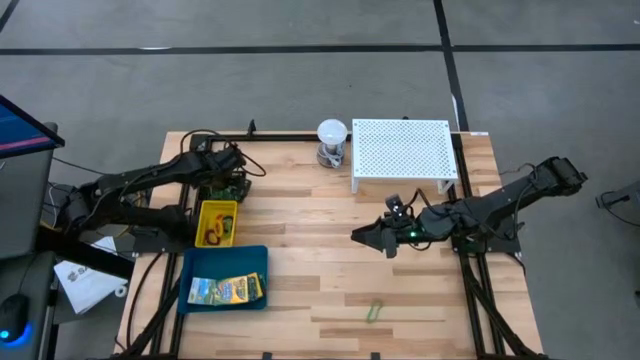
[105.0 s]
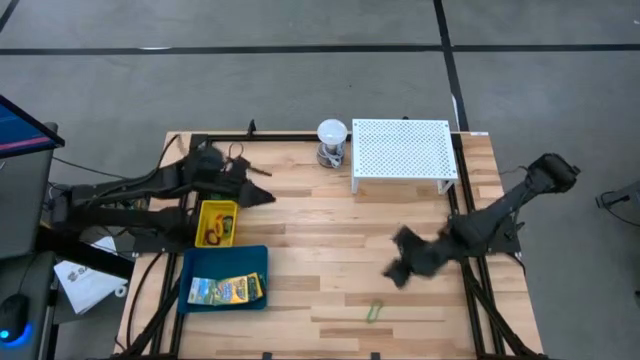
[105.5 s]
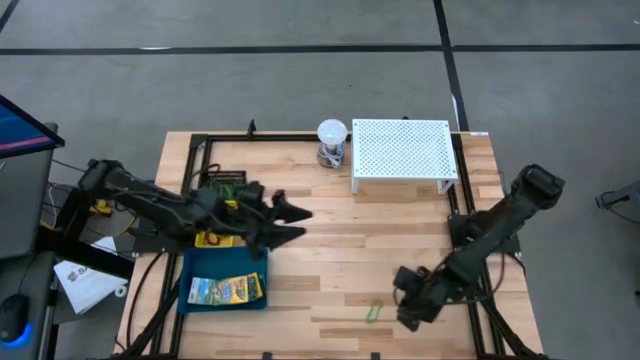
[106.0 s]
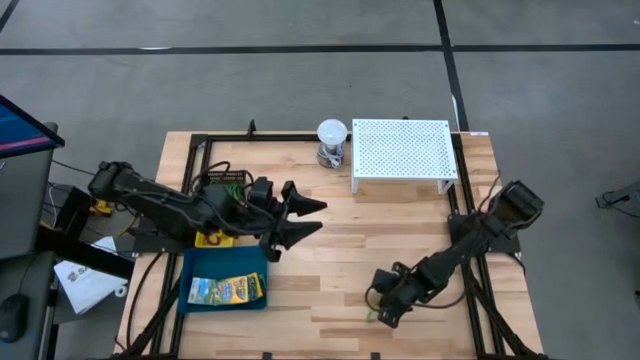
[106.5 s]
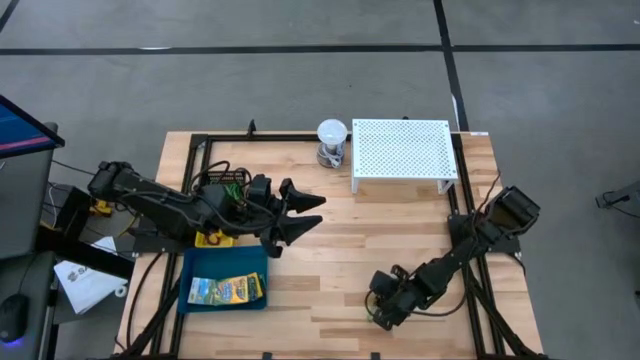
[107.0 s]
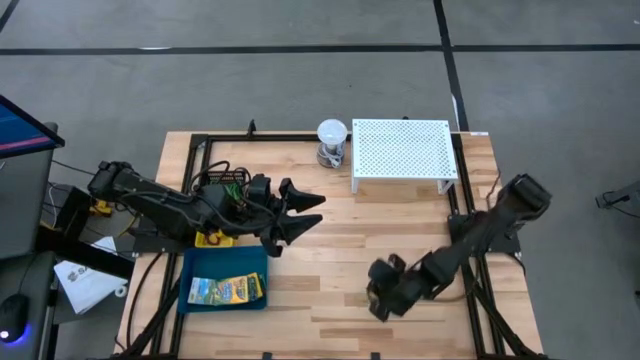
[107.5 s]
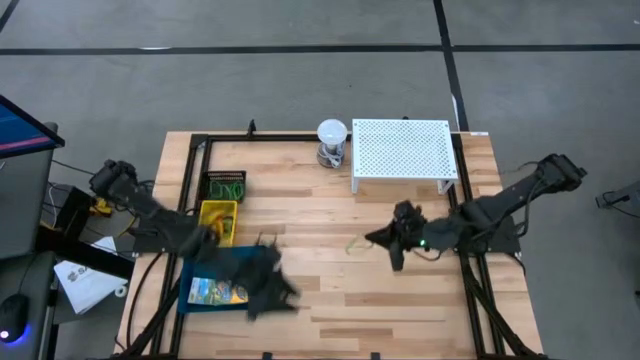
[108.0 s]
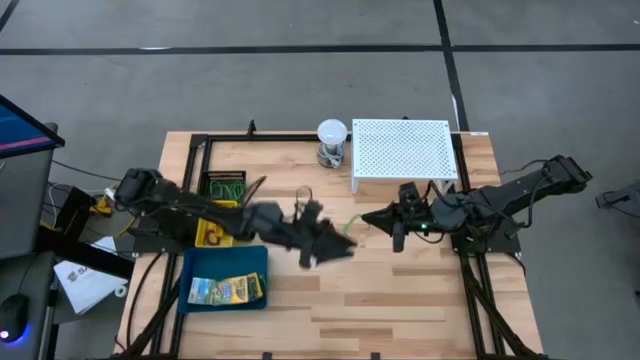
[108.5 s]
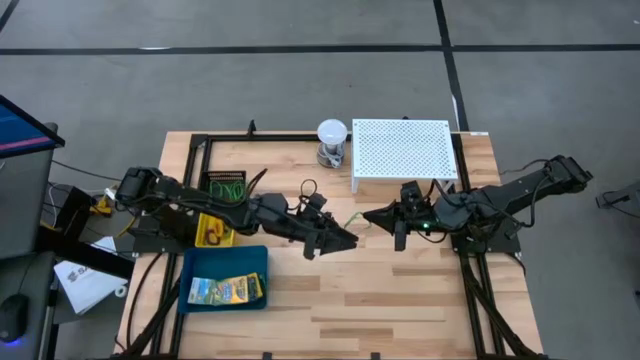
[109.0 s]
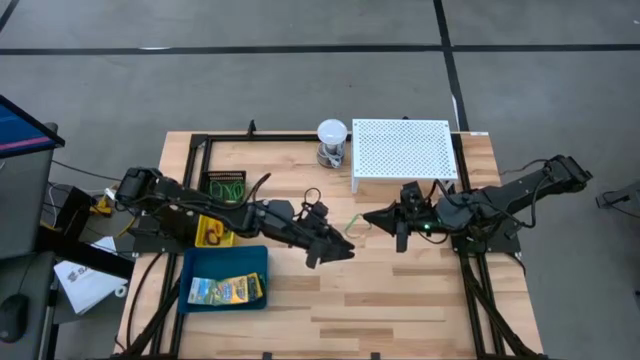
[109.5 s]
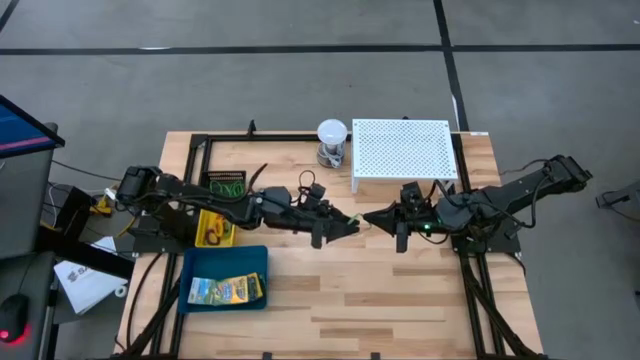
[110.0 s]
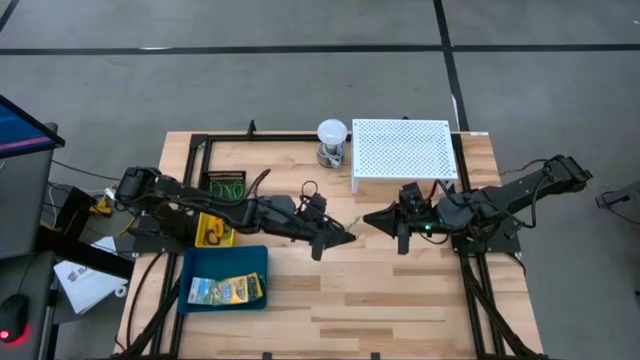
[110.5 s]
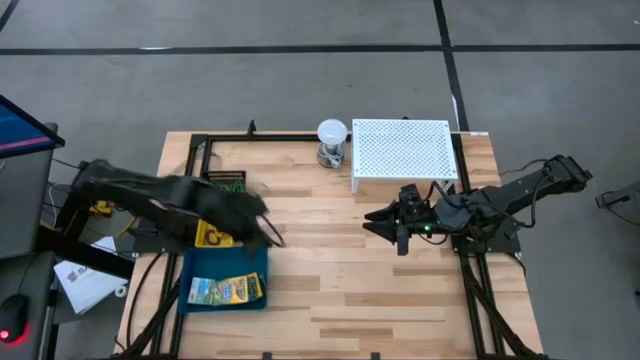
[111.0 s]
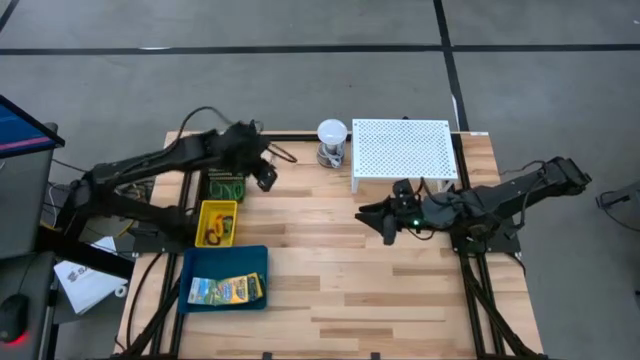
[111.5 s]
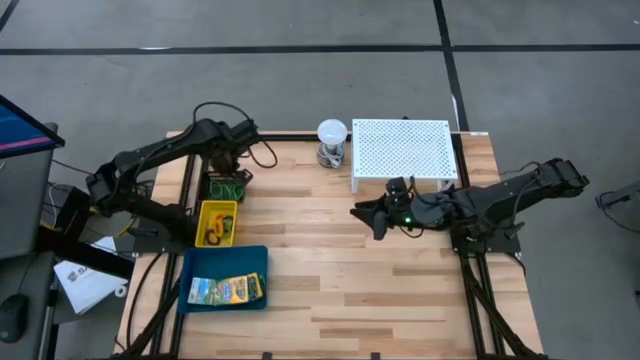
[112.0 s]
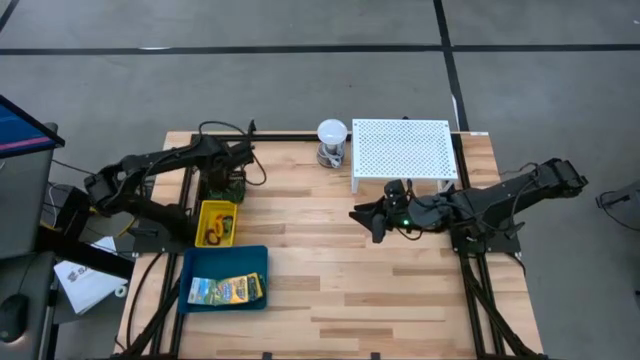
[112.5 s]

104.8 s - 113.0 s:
Task: Pick & Place Office Desk Supplies
Put the rubber band into the black bin

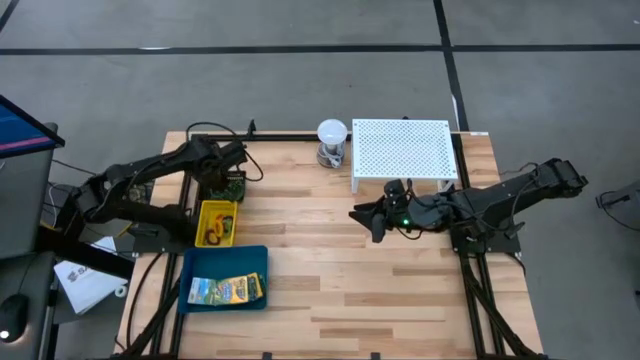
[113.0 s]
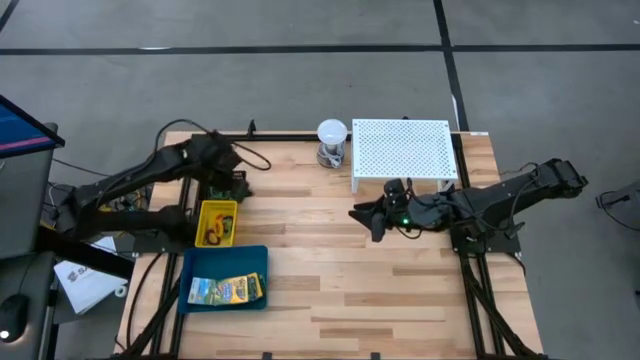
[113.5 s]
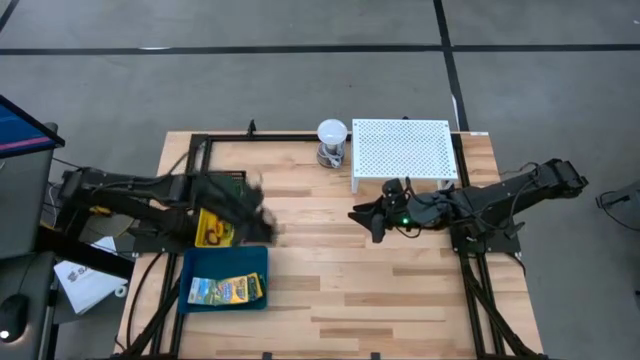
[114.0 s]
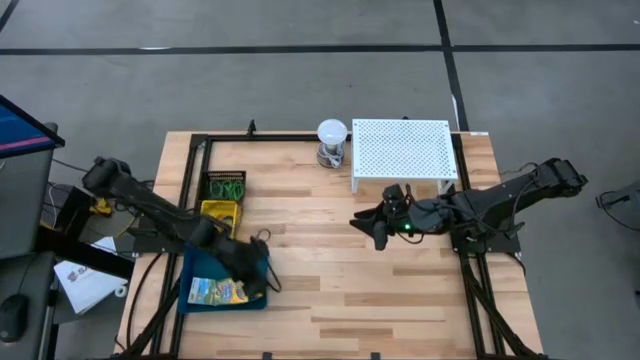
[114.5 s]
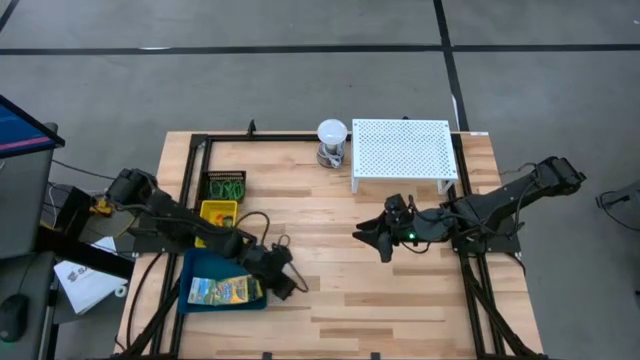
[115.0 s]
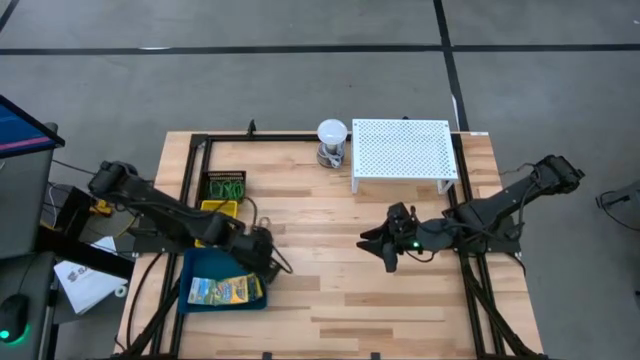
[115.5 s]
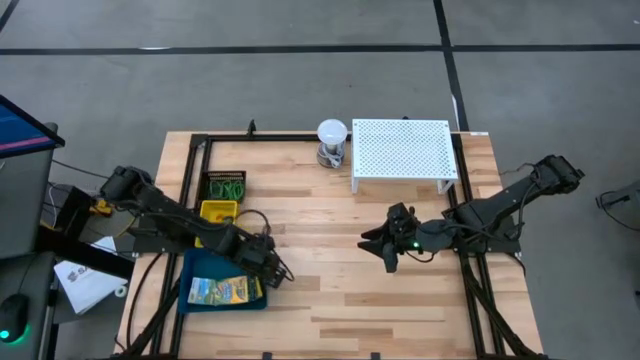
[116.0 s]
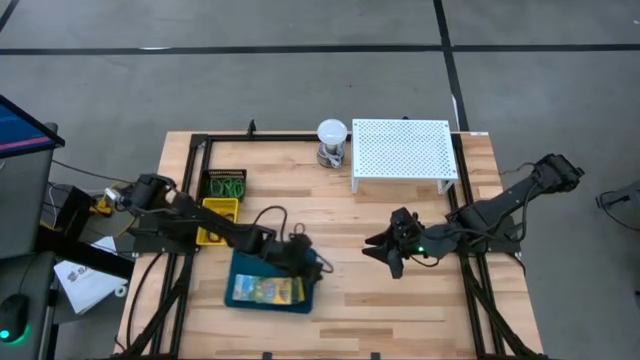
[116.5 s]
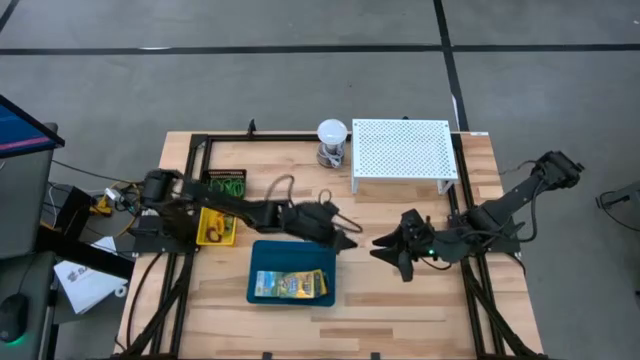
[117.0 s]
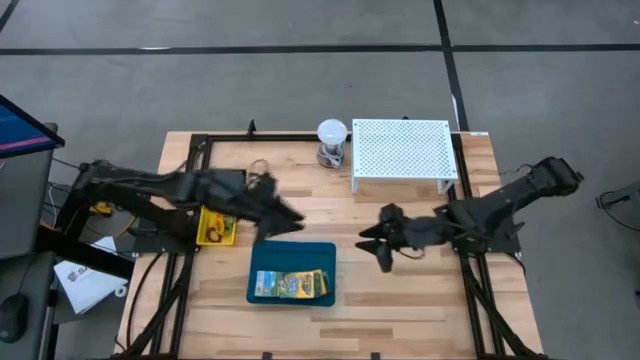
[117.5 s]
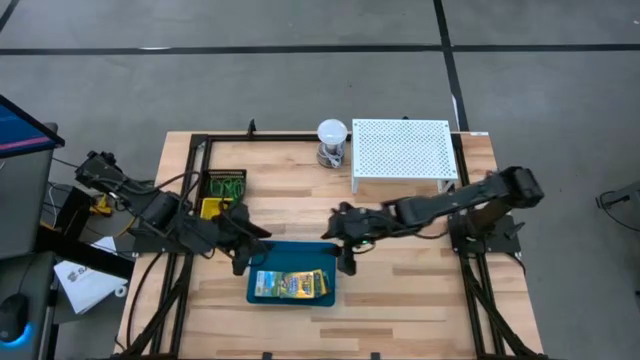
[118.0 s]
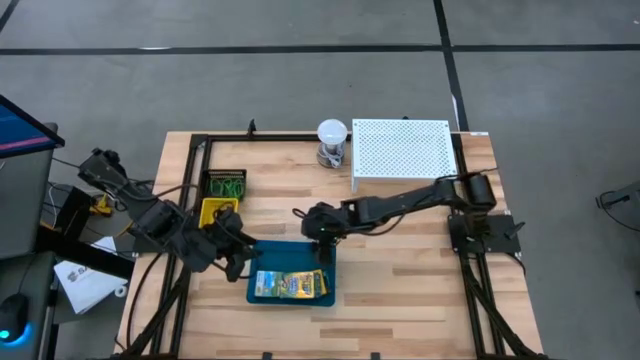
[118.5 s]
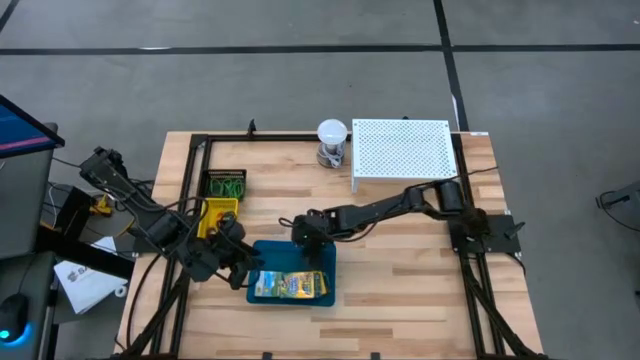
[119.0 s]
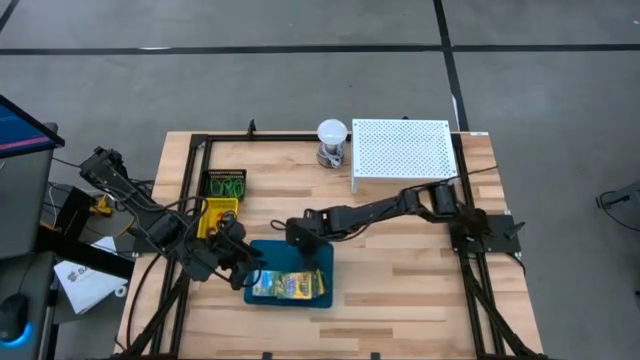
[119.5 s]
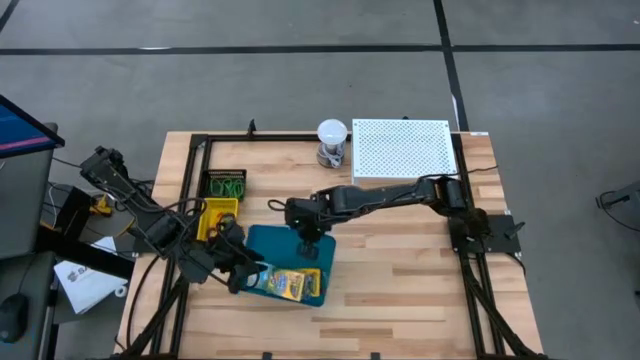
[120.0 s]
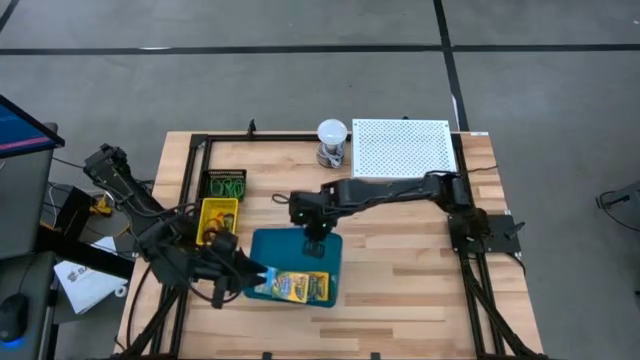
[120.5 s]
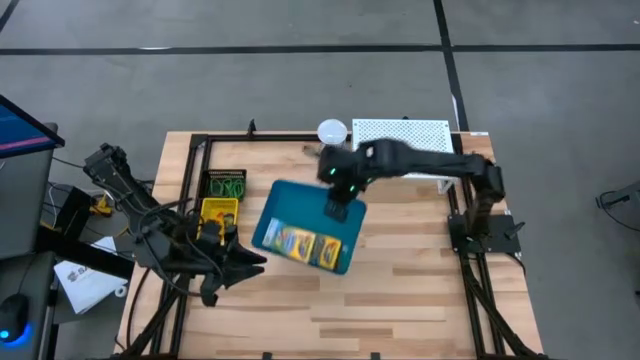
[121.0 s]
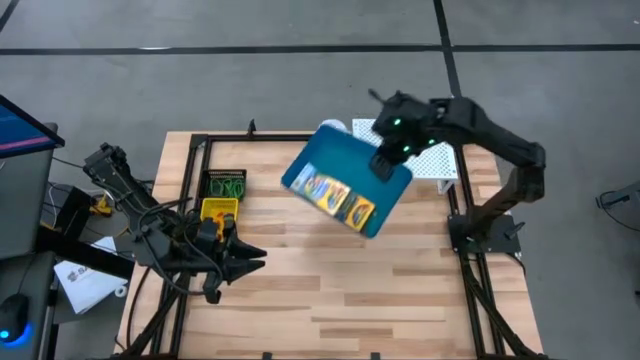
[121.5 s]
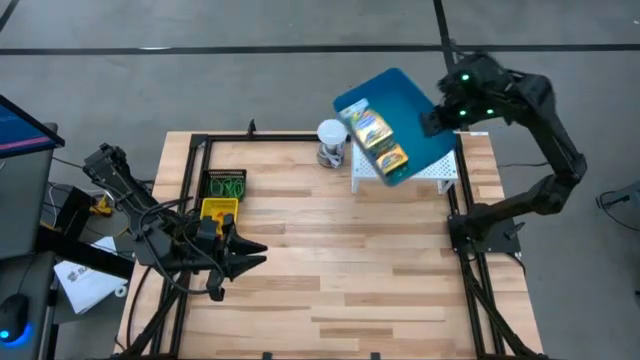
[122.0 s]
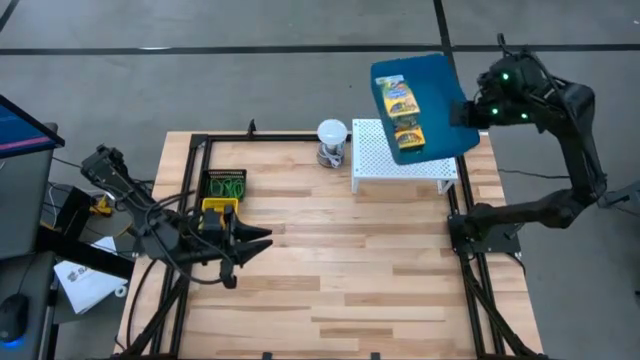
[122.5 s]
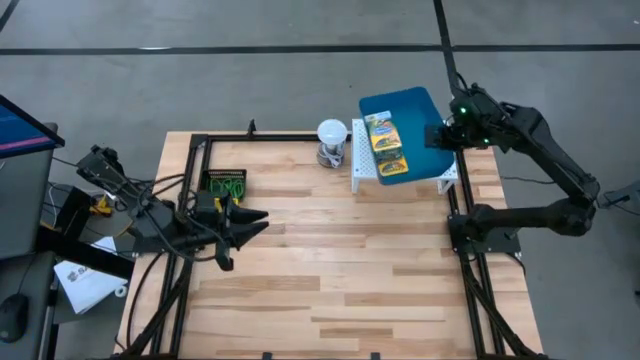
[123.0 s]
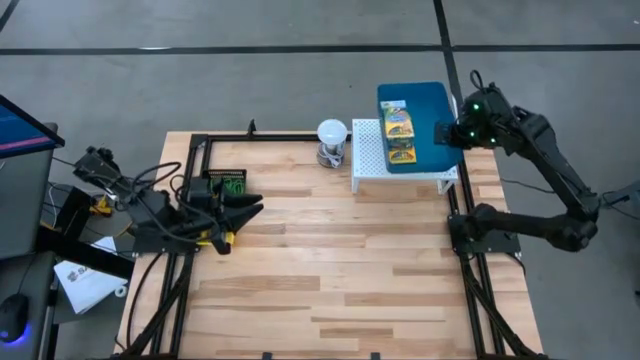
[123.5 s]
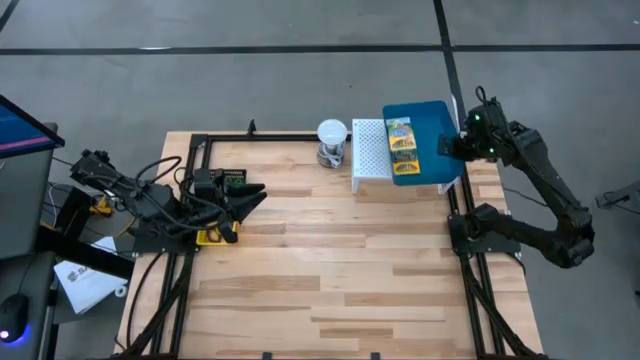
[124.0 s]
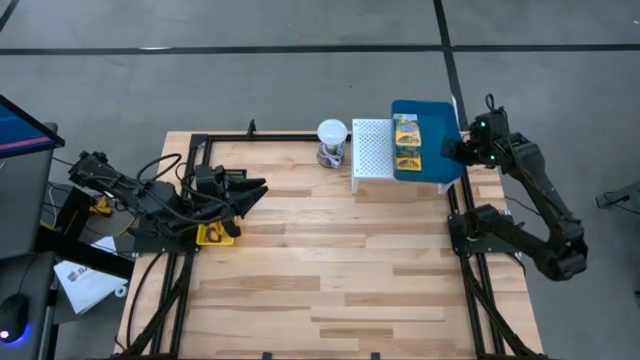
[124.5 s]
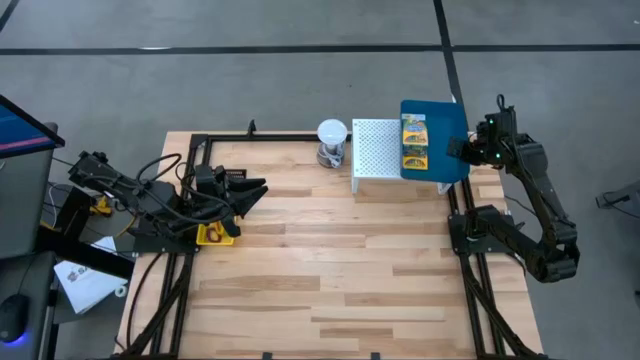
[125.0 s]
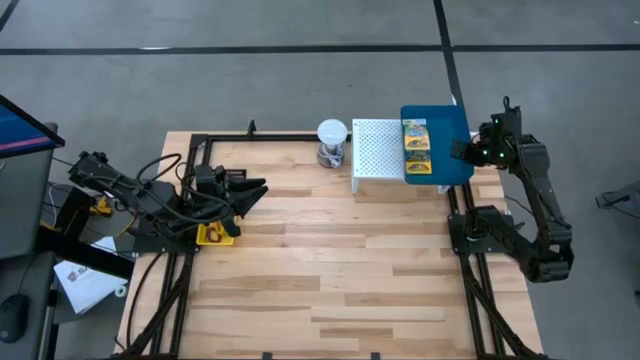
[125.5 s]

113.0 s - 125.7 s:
Put the blue bin on the shelf

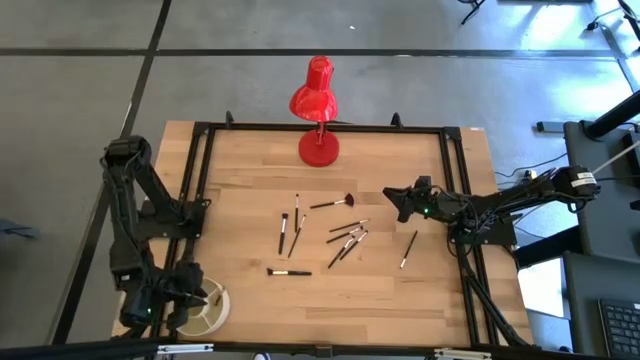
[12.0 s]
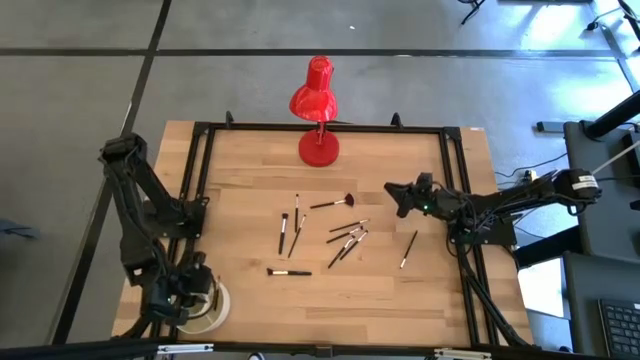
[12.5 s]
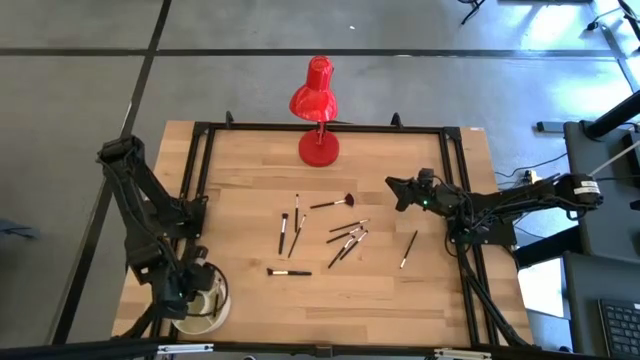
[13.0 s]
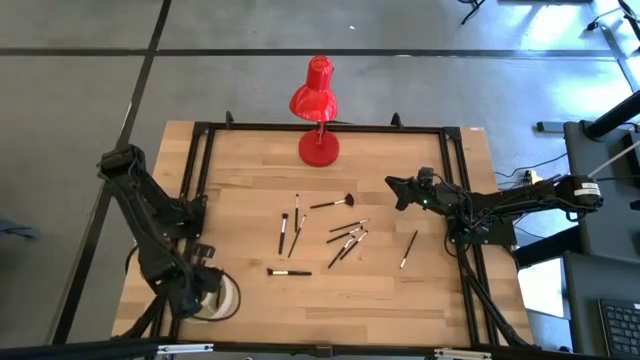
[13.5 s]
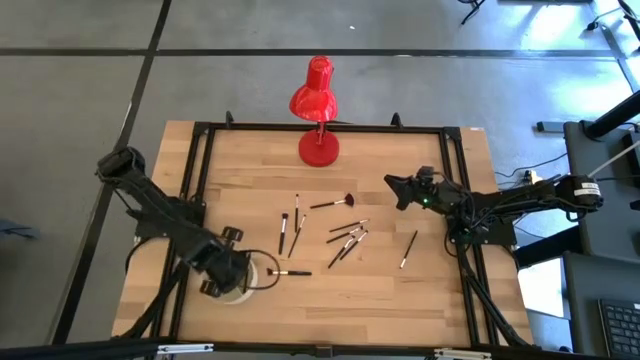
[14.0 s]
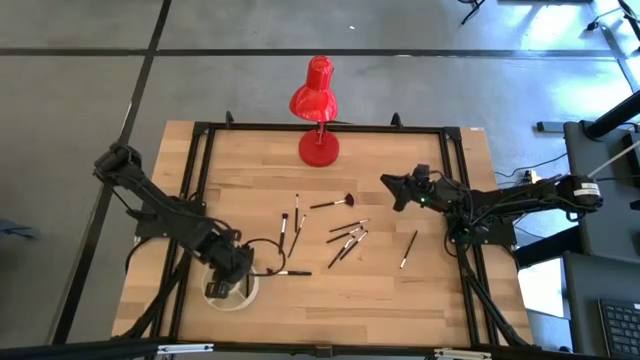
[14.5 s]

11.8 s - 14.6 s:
Task: Put items in baskets/containers
Adjust the pen organizer
